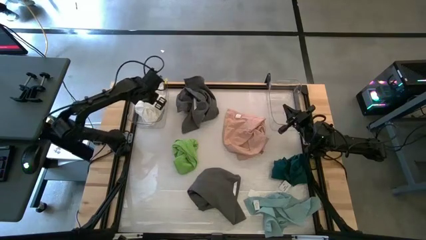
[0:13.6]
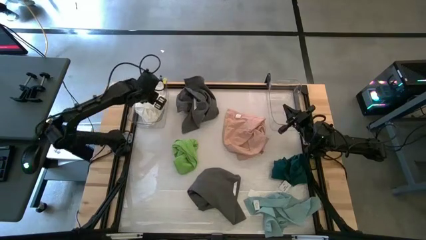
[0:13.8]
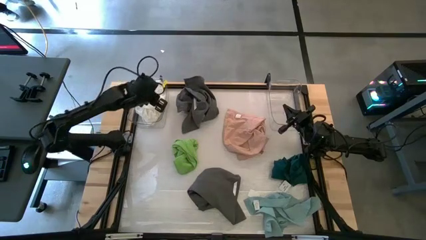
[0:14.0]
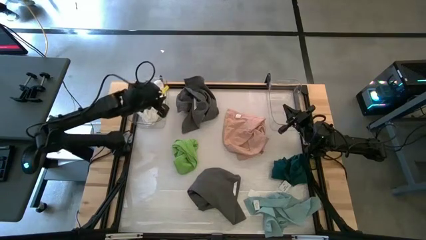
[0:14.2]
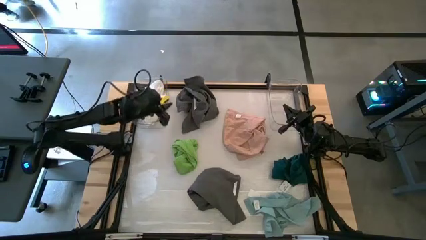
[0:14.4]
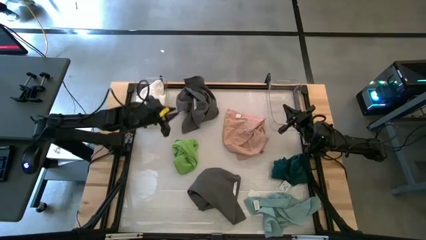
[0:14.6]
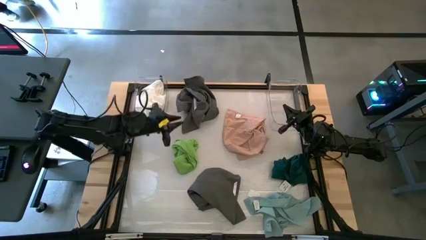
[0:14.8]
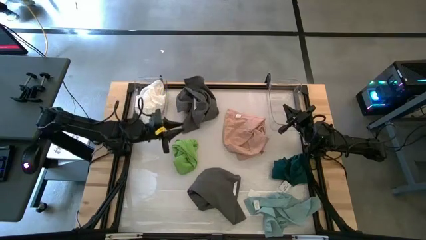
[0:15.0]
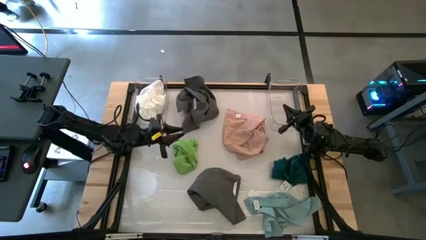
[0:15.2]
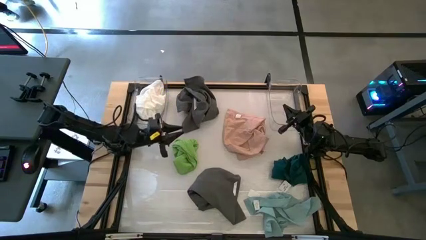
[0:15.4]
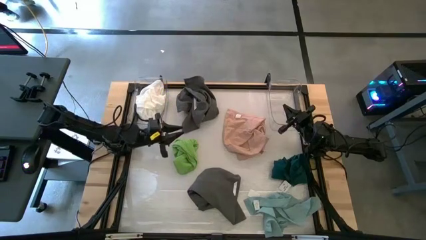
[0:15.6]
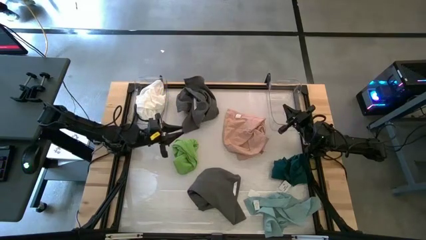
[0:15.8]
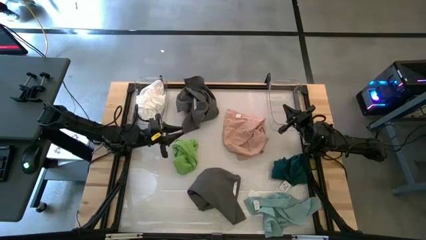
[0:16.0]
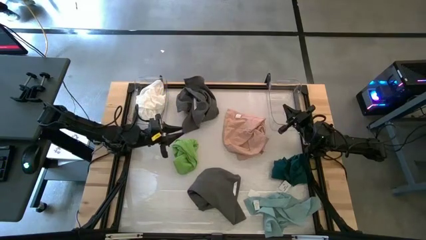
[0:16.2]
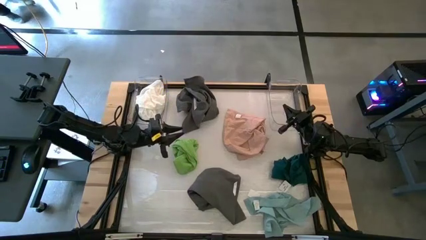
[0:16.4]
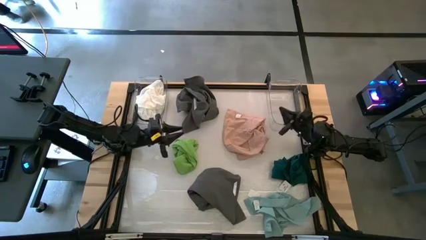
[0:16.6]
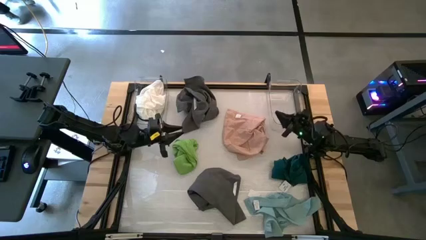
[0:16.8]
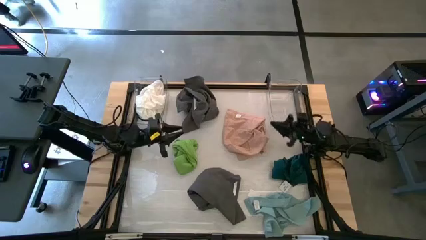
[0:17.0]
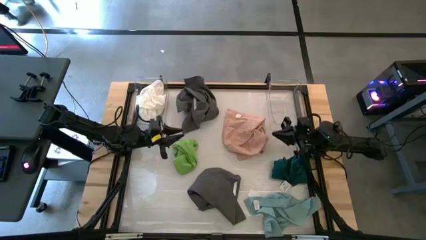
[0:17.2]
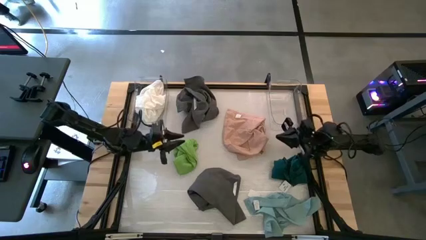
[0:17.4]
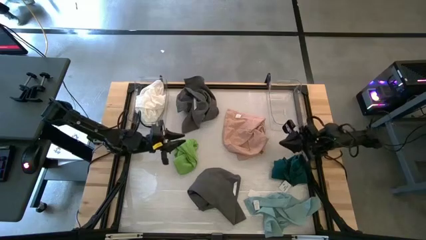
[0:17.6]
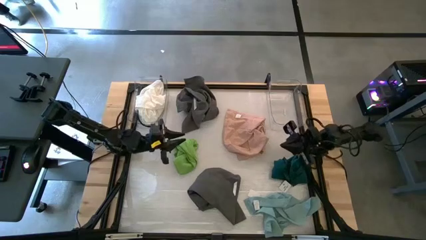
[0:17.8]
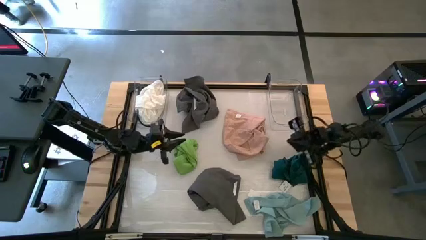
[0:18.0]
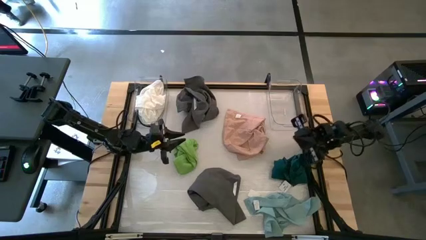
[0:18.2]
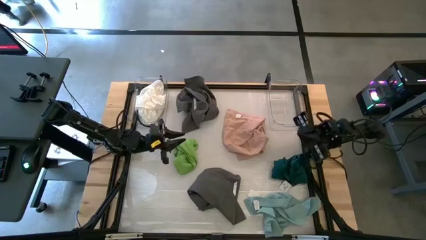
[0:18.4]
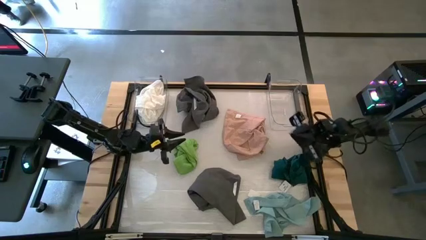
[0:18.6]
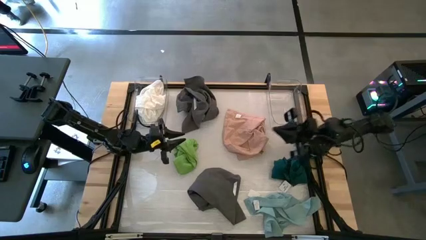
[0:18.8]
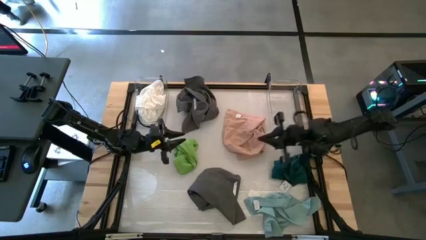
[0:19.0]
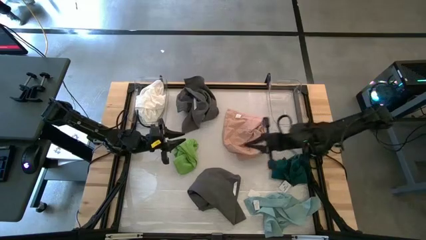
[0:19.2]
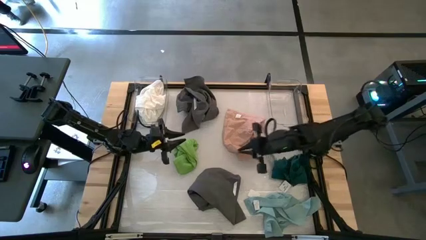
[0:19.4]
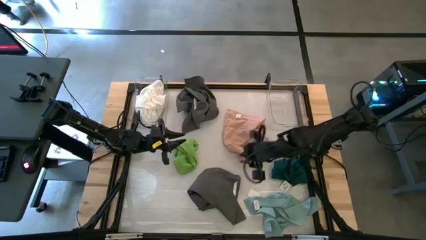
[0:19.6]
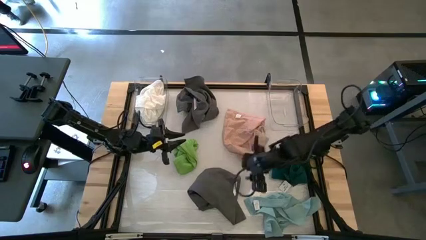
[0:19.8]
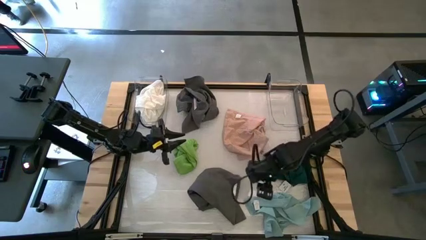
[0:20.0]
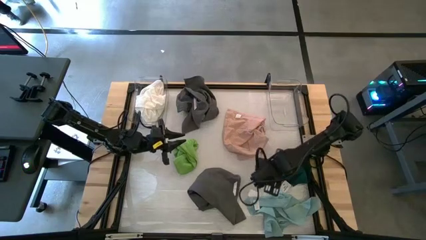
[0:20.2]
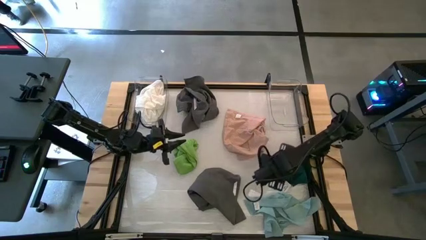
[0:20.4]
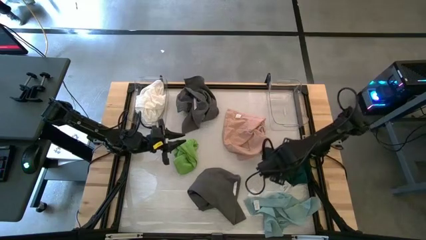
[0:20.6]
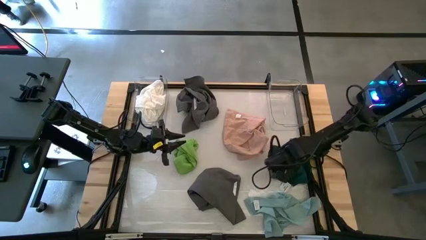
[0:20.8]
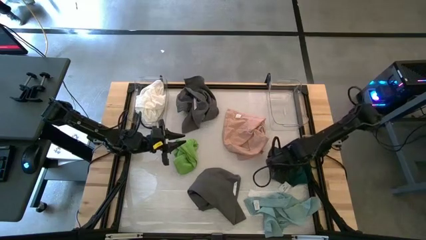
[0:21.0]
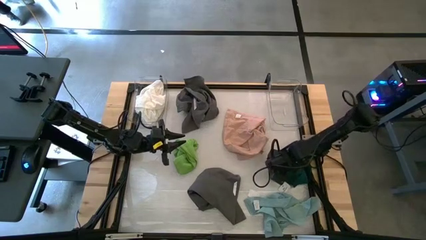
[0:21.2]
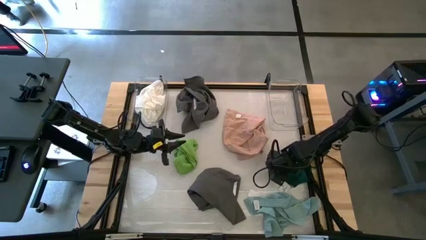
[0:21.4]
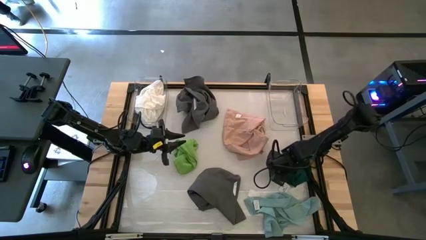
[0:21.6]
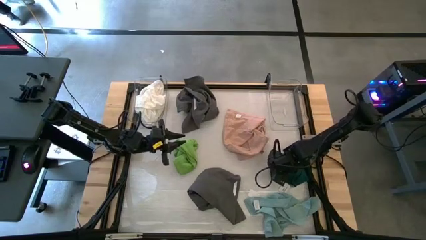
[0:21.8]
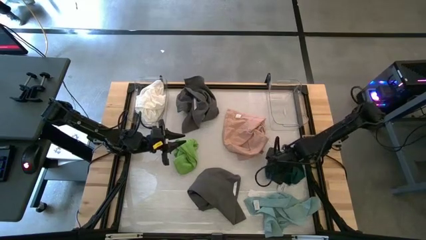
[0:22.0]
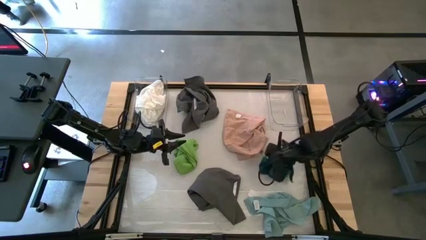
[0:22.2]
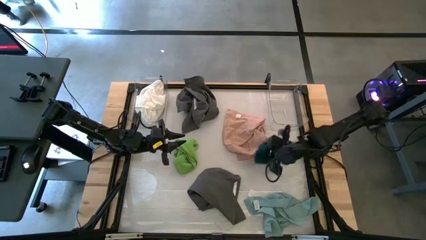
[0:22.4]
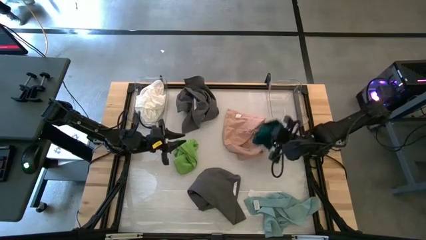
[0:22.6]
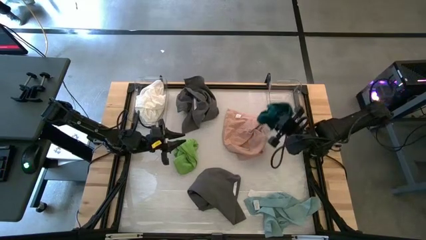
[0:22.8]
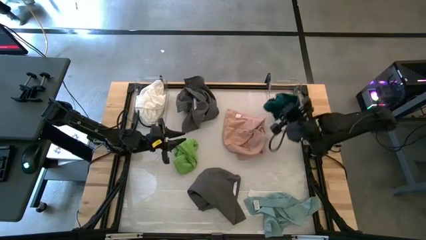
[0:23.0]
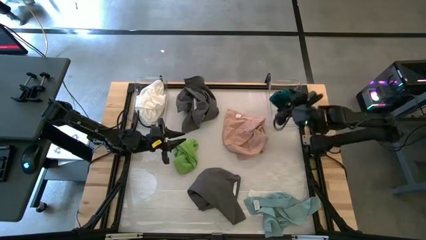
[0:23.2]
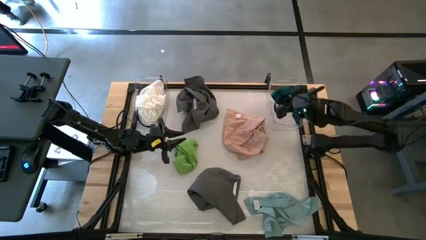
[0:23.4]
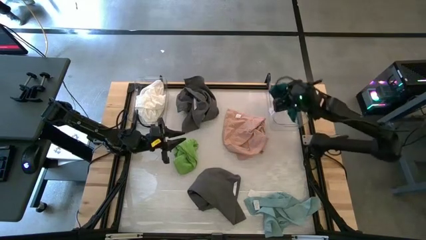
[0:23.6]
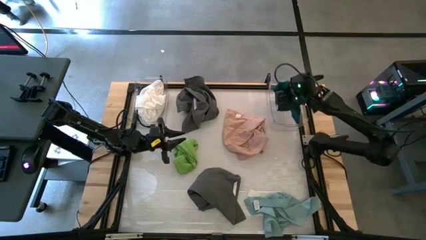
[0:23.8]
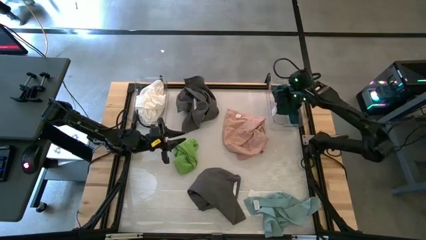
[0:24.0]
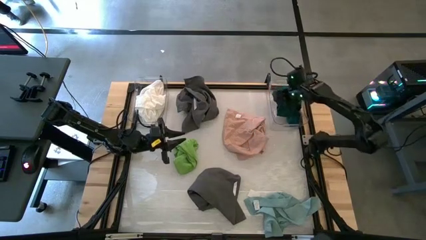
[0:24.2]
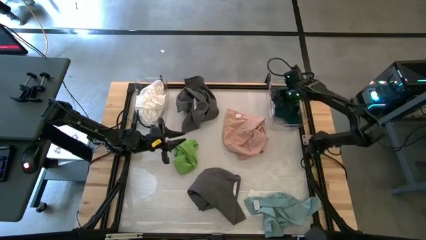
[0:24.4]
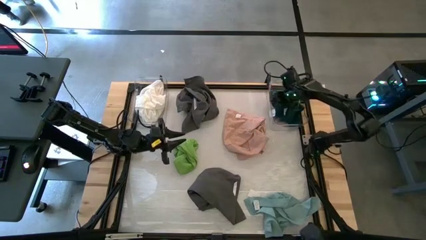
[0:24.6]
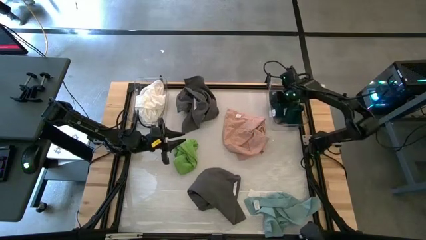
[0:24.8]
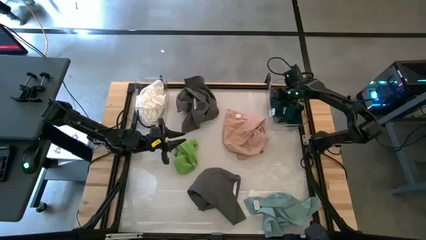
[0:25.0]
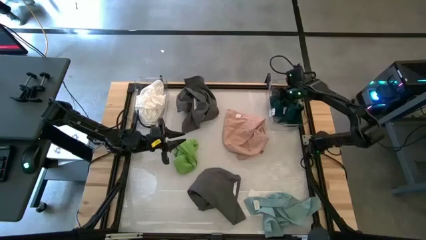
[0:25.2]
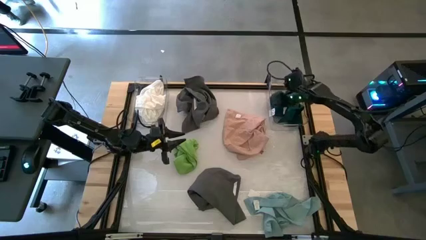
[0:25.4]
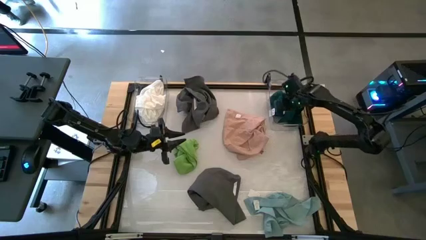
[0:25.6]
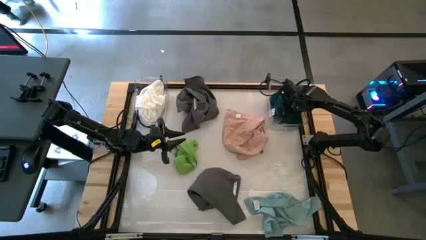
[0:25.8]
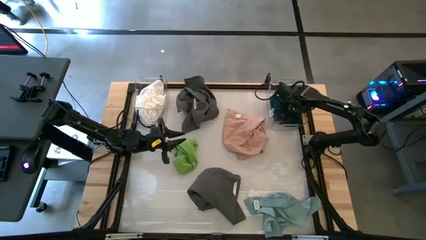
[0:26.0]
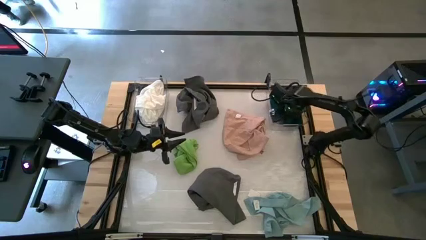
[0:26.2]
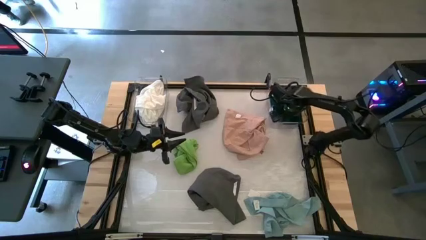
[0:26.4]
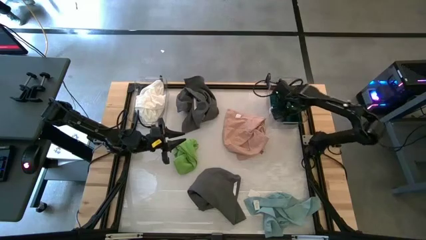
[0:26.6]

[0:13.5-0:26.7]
Task: Sort towels by color in basket
Put the dark green towel into the right transparent bin
